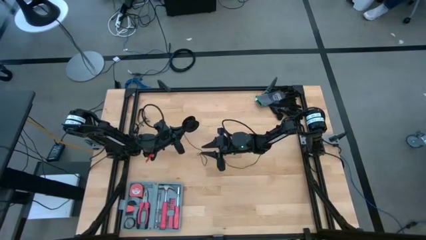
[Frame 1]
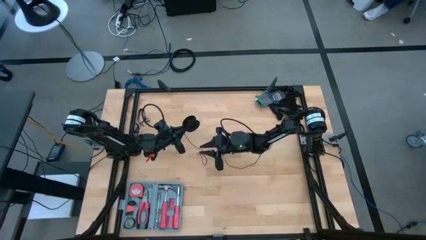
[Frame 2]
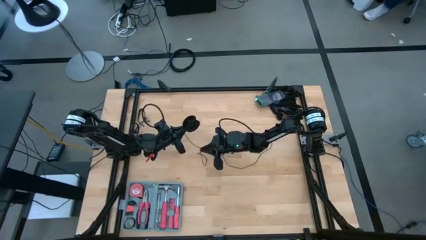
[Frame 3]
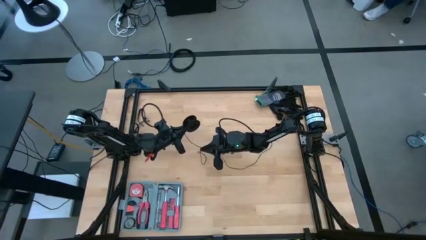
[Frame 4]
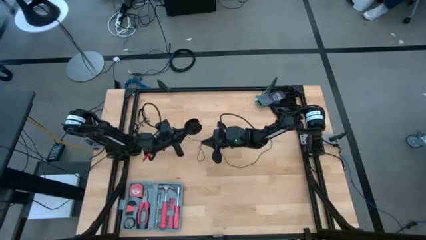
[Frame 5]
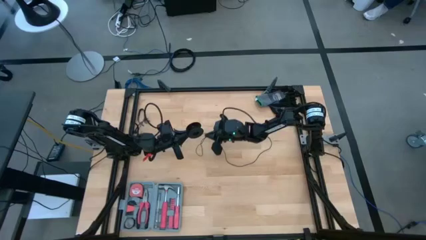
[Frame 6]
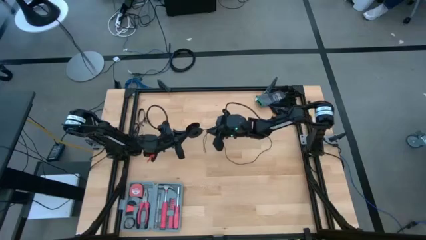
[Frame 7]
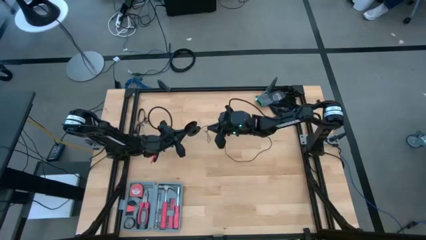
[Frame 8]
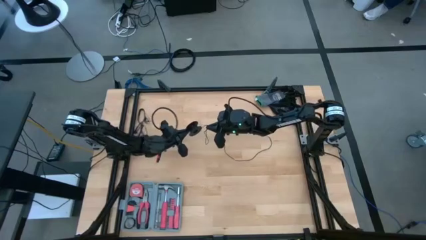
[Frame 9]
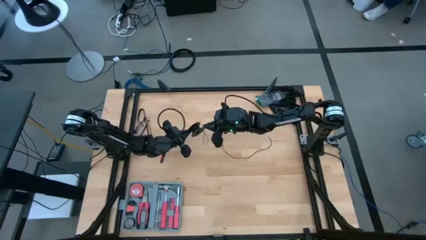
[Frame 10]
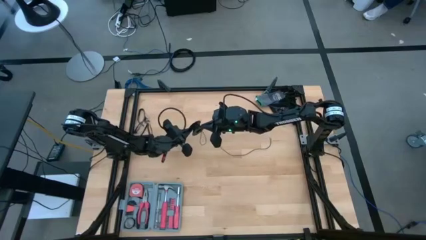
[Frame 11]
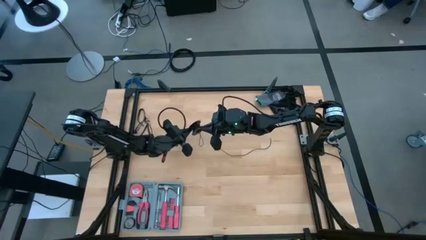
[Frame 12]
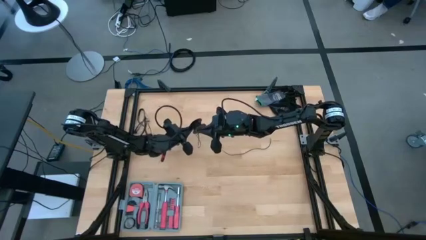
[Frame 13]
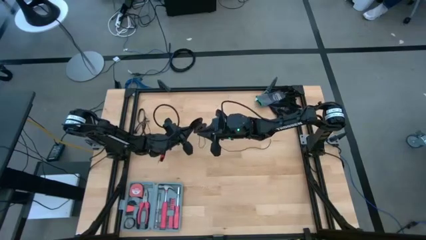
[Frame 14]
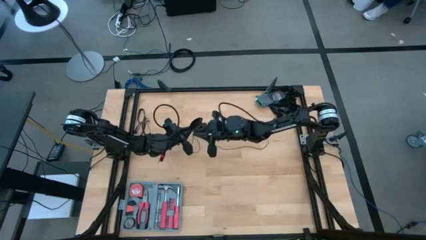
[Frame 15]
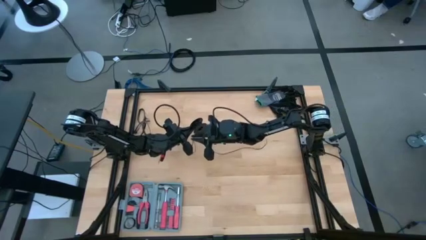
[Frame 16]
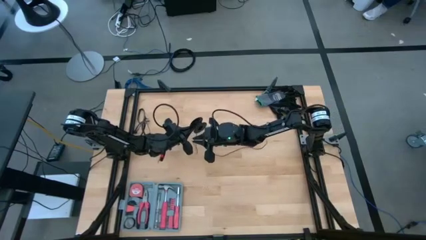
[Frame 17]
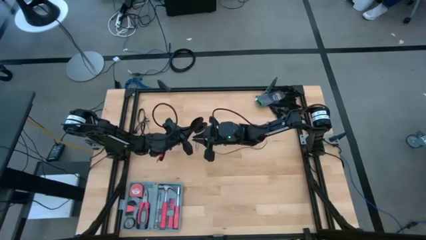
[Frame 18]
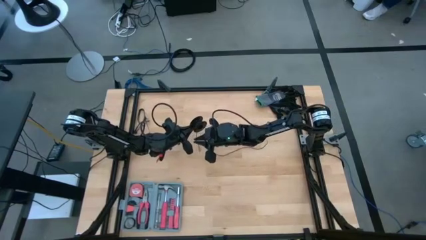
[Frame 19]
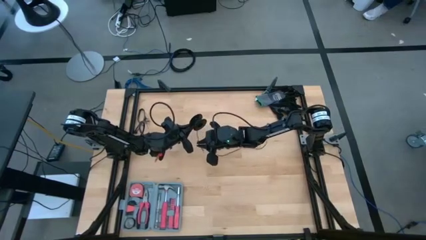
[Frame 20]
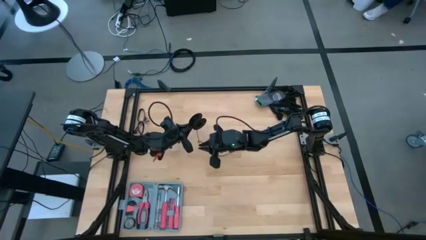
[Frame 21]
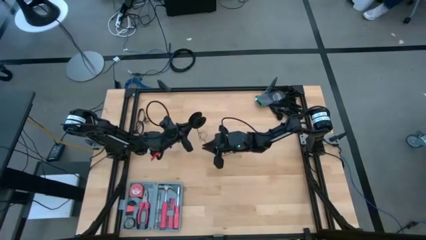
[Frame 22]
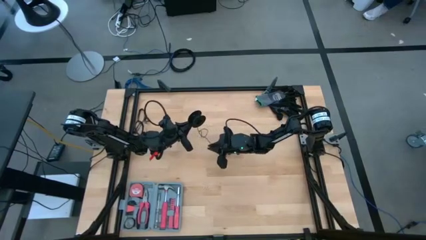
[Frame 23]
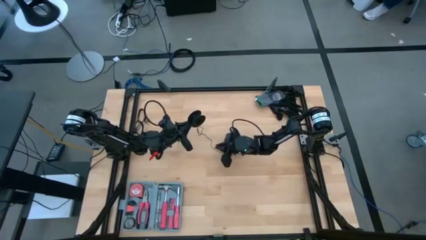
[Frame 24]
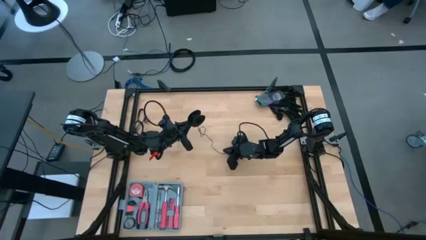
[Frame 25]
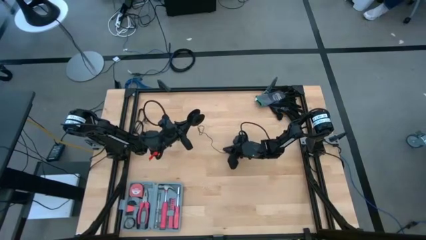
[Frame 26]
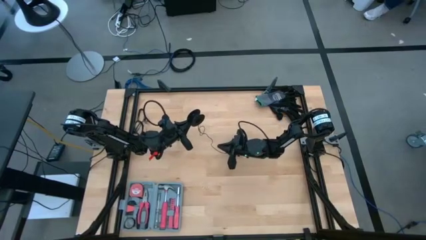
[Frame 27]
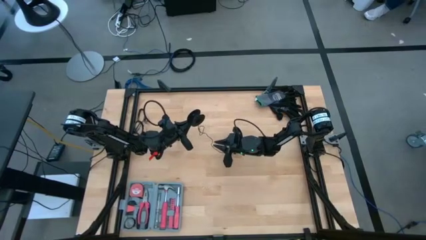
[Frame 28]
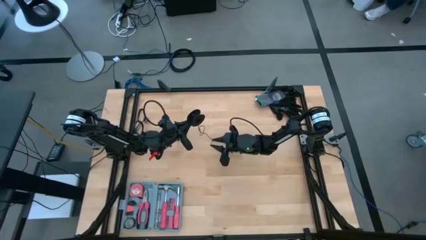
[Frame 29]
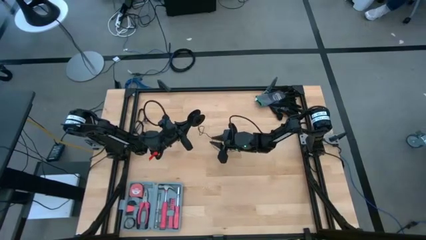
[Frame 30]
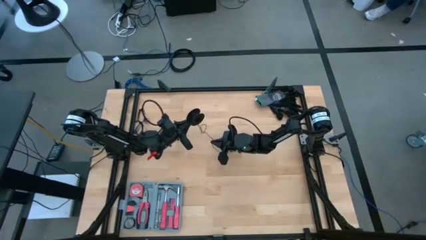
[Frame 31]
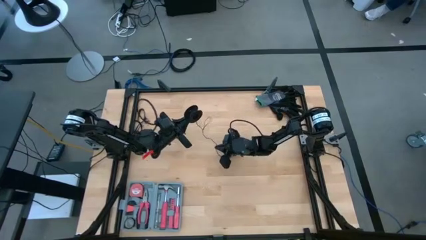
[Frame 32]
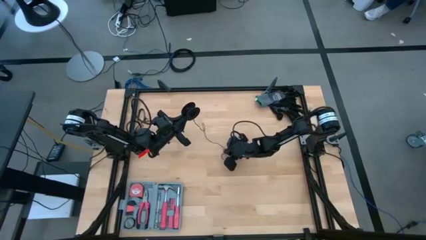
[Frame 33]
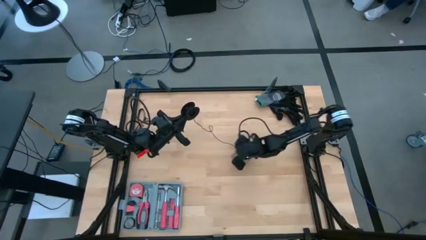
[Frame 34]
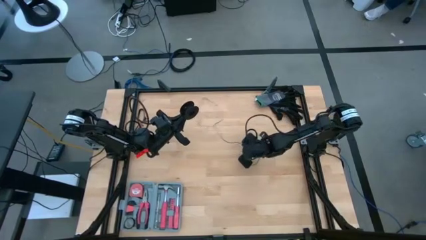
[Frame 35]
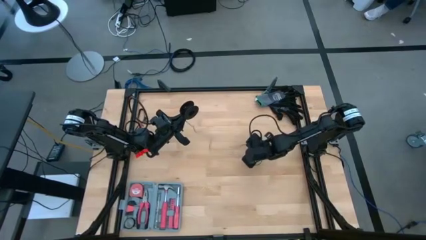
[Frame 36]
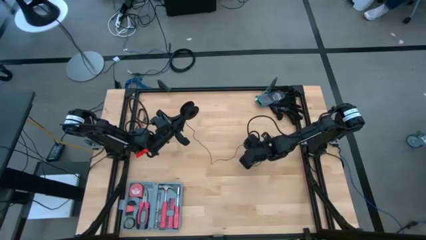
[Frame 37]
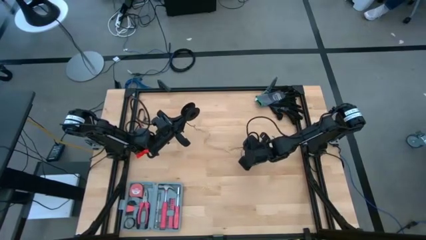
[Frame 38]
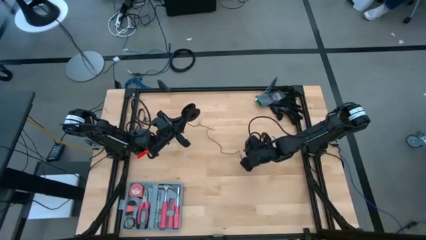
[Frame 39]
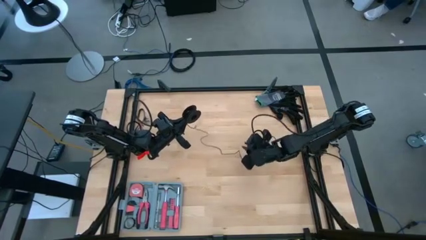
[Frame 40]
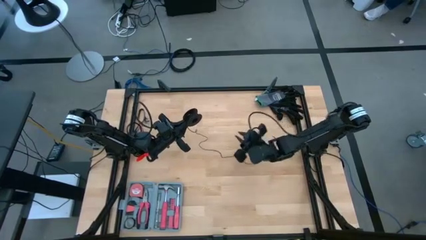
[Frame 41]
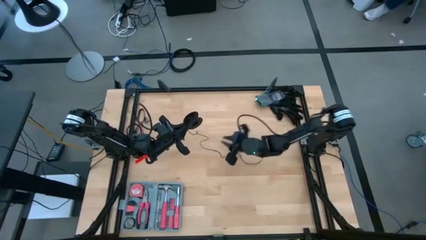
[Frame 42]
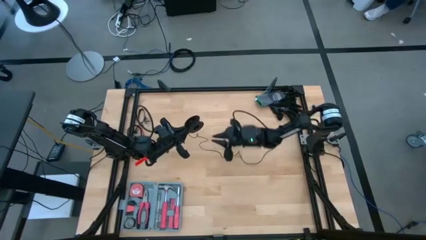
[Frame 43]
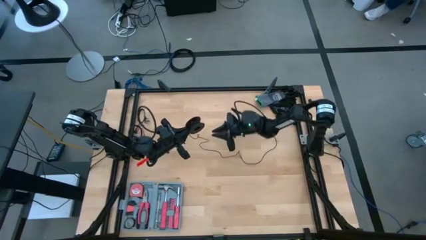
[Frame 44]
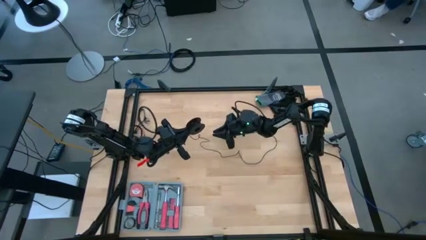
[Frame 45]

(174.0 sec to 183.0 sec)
Task: Coil cords
Coil the black wire on the spool

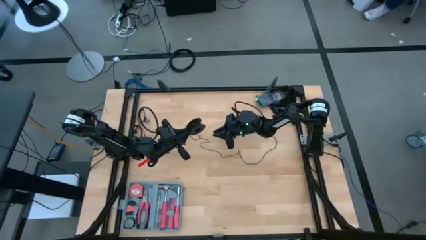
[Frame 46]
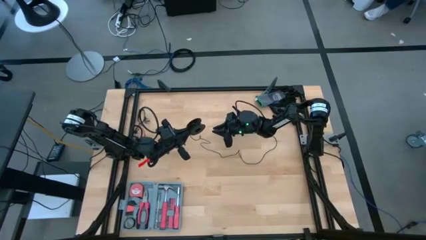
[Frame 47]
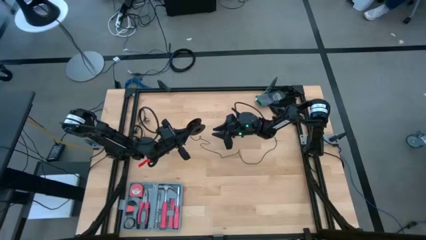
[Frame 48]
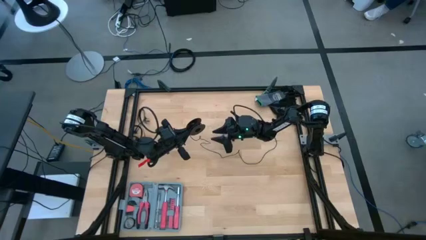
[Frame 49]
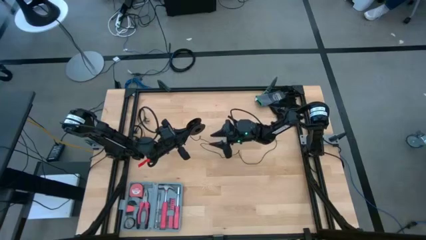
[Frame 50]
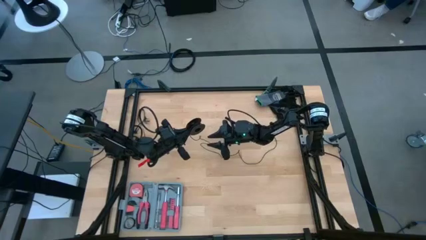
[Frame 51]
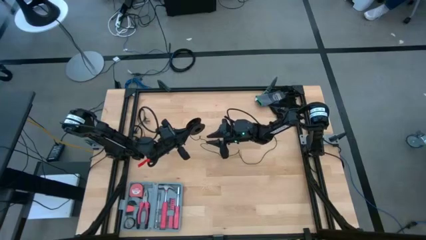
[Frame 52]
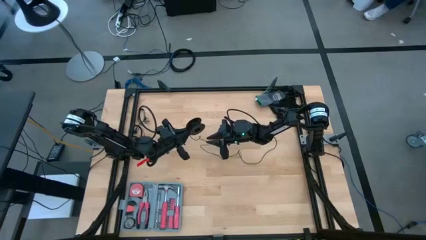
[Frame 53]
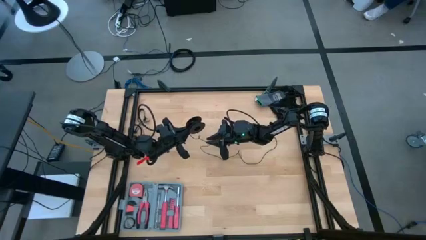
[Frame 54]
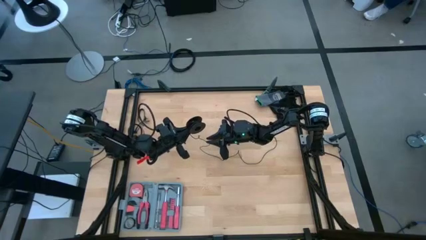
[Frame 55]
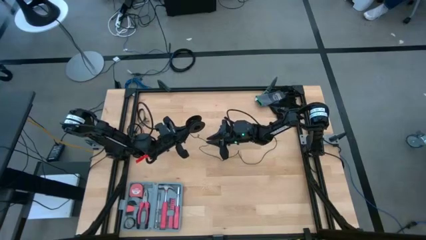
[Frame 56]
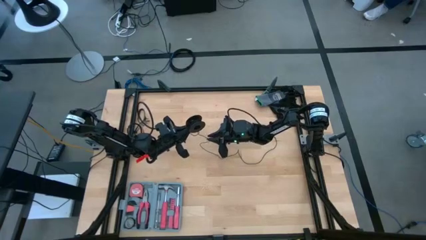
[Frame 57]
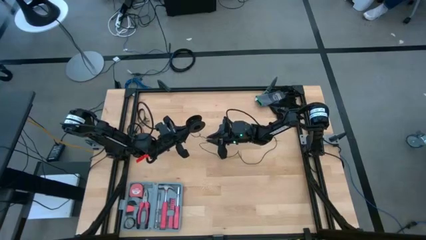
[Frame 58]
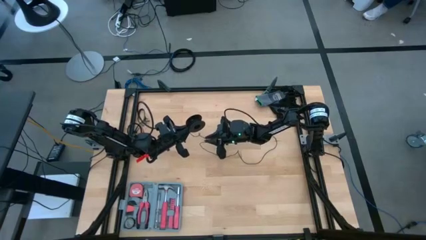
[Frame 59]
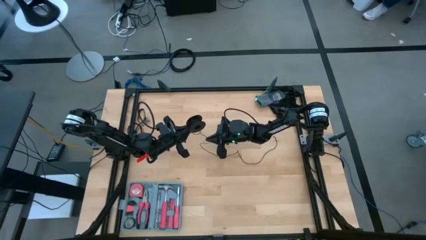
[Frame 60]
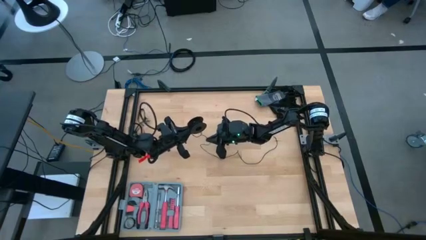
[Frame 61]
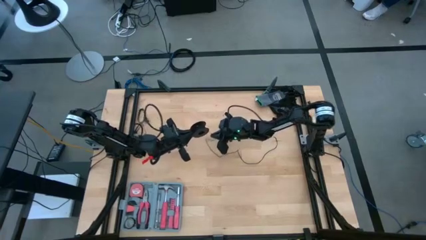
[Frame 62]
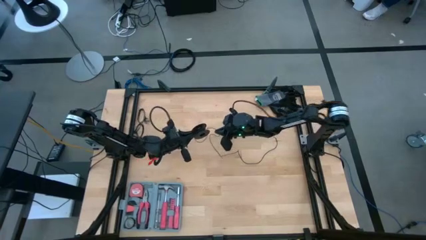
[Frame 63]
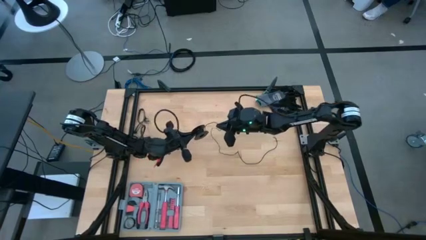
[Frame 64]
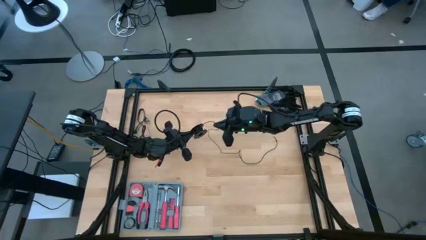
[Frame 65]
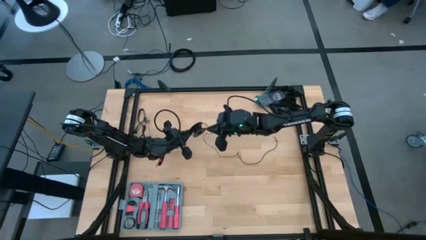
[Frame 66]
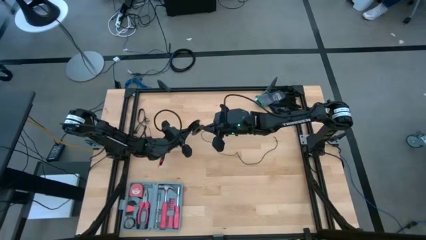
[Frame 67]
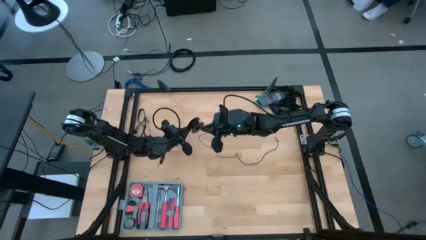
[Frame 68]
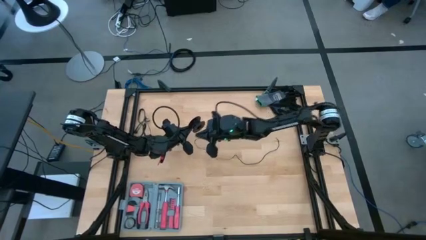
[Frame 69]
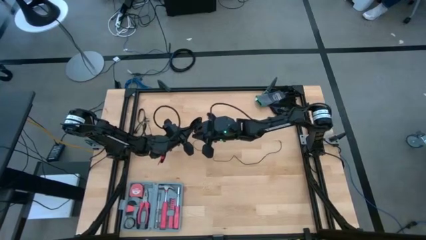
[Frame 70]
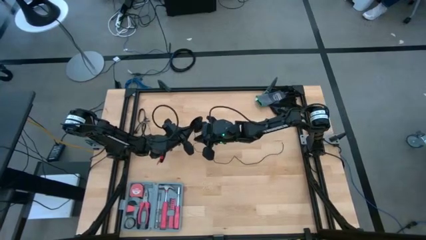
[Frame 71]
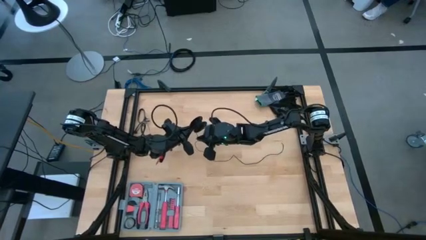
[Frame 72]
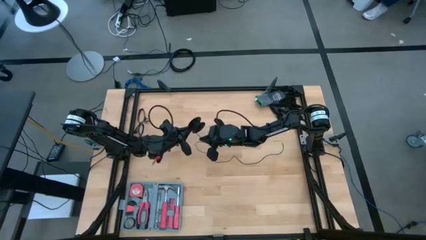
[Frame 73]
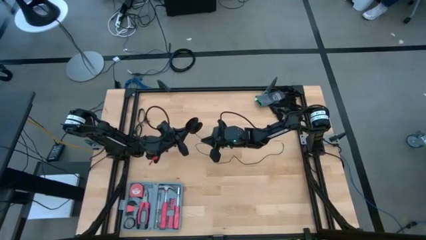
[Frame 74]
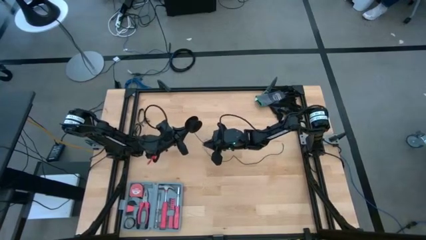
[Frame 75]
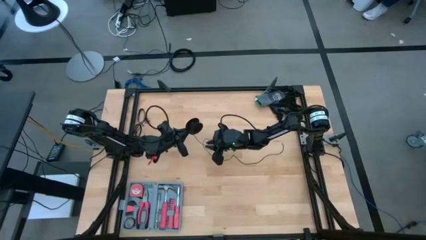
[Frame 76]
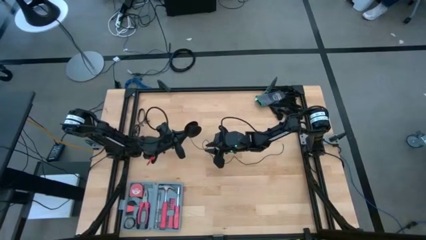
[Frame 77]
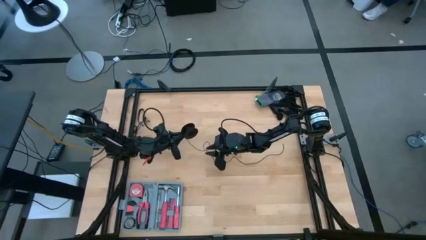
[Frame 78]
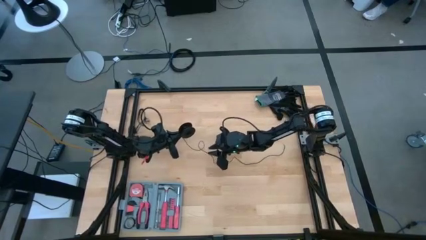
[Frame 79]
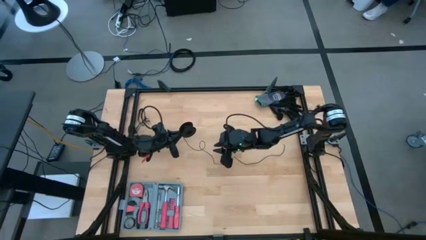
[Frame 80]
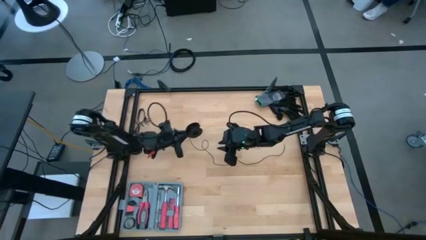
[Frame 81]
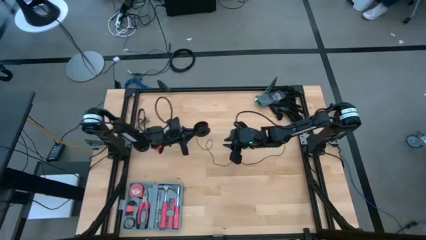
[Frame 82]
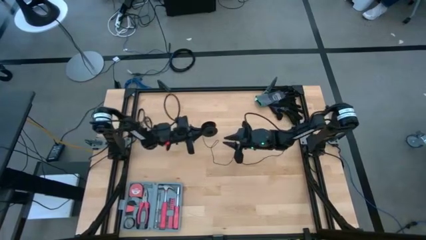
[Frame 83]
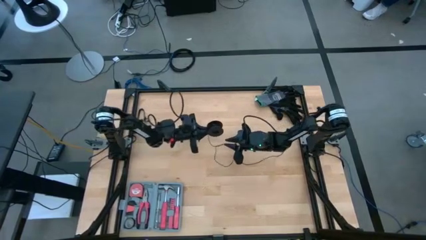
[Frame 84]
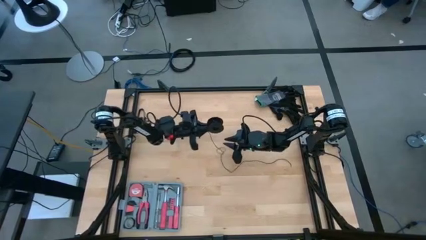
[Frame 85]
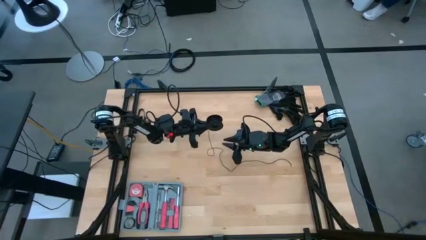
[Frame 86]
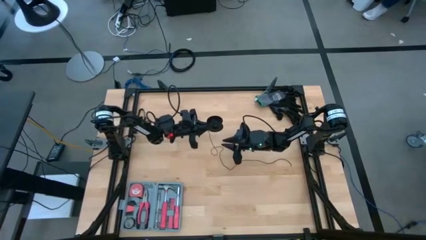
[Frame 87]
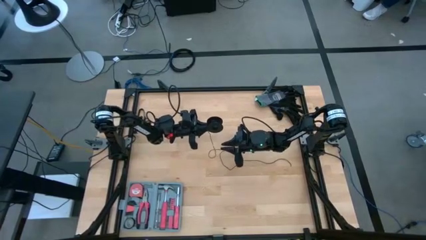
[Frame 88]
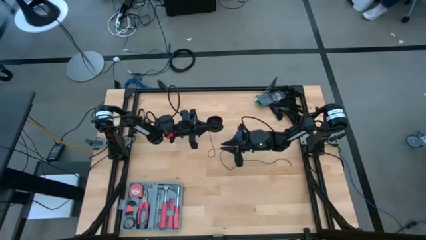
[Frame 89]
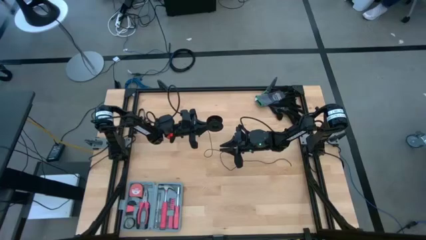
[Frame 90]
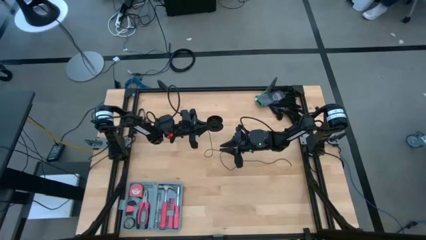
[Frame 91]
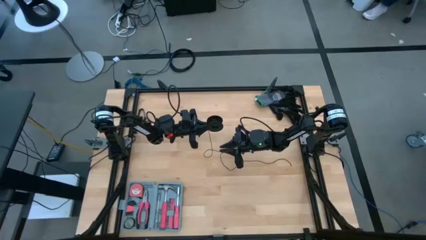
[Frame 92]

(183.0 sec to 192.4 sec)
Coil the black wire on the spool
